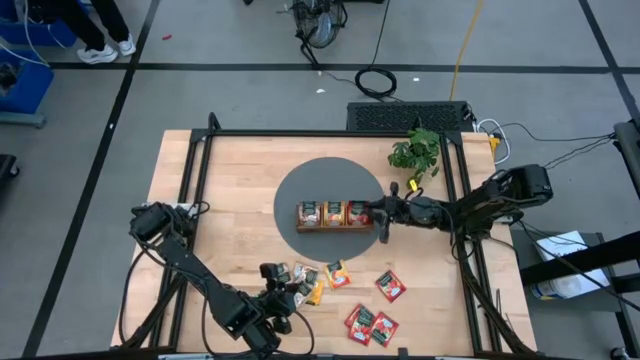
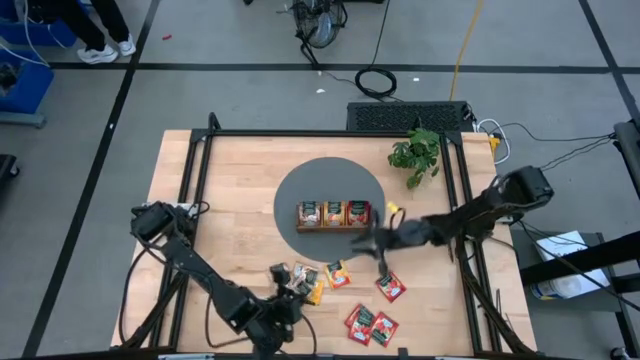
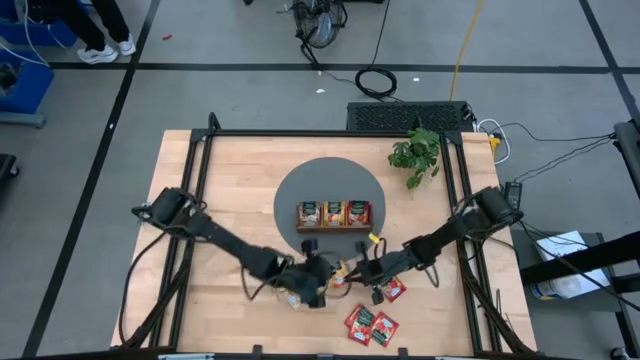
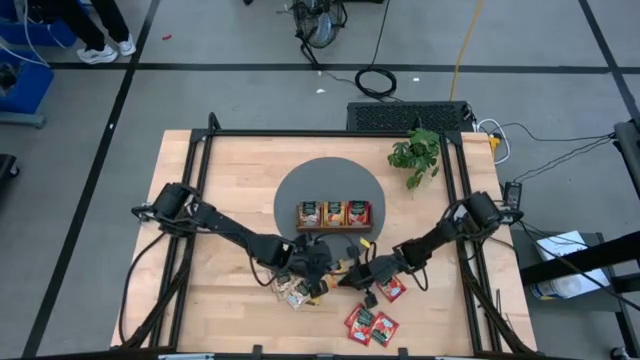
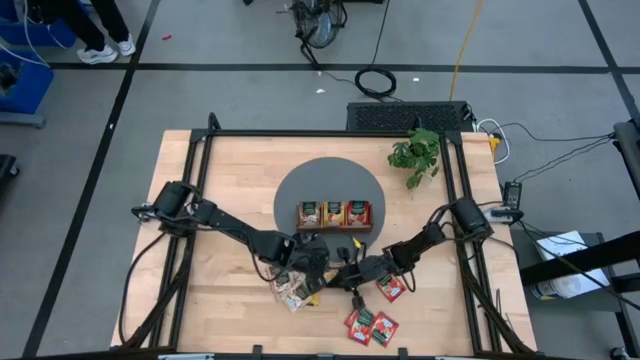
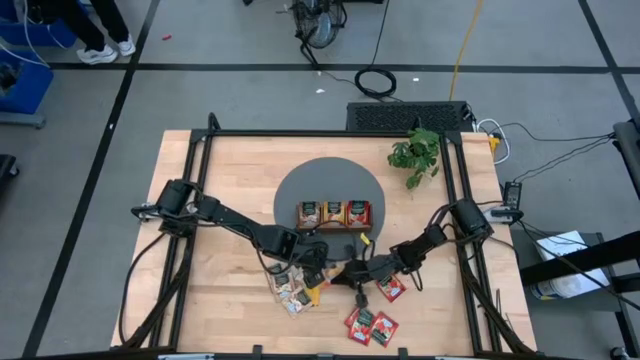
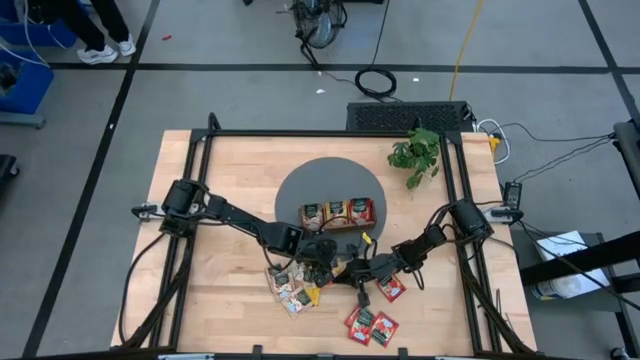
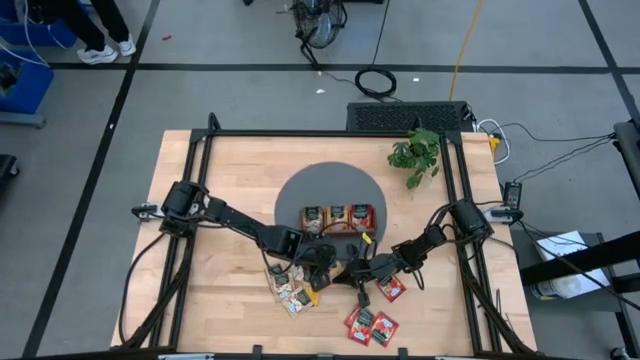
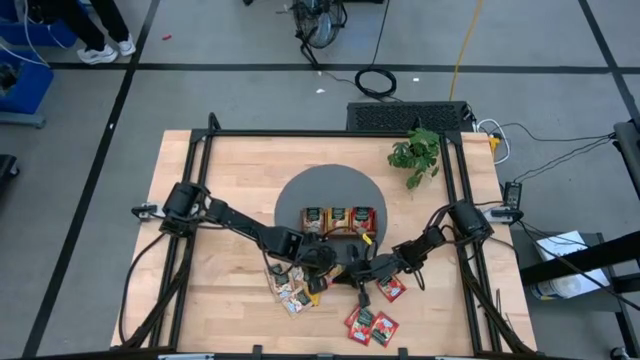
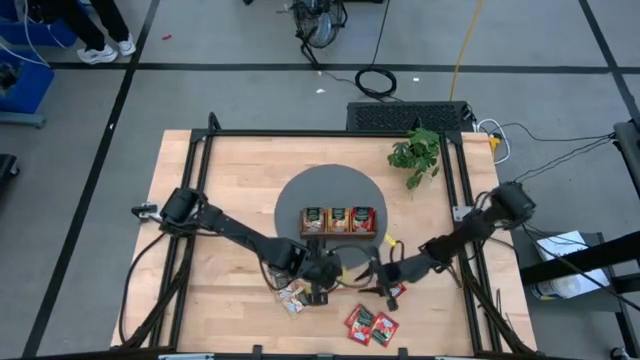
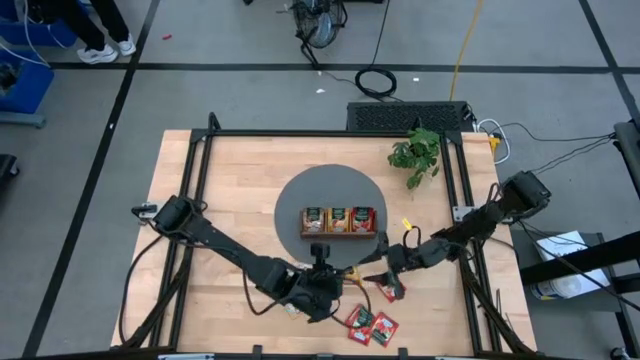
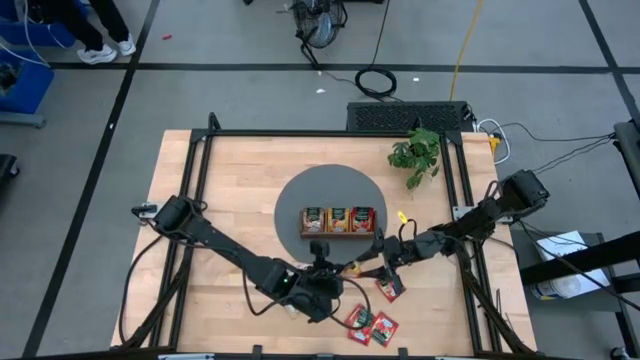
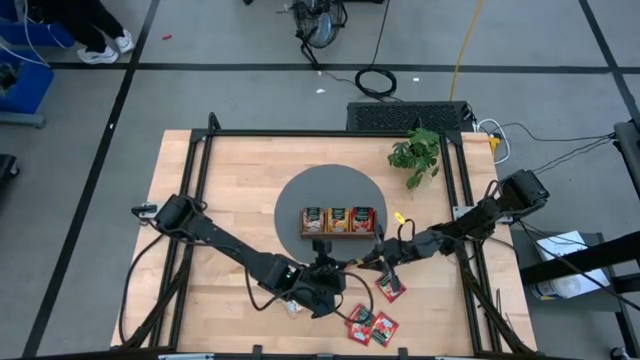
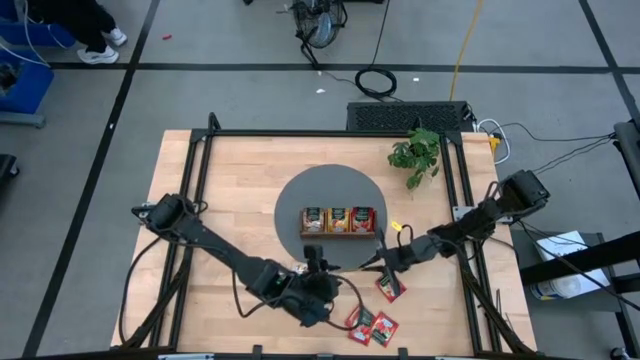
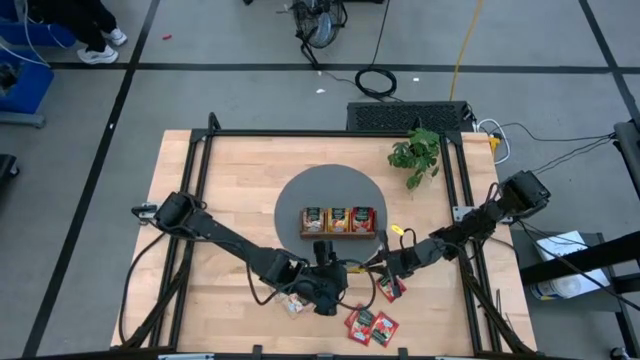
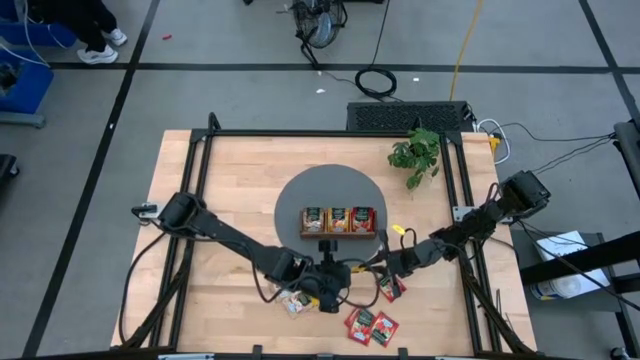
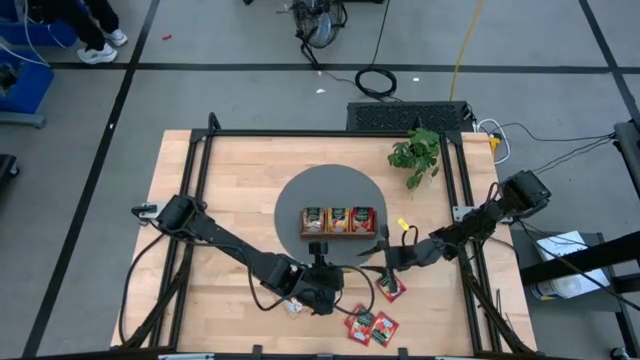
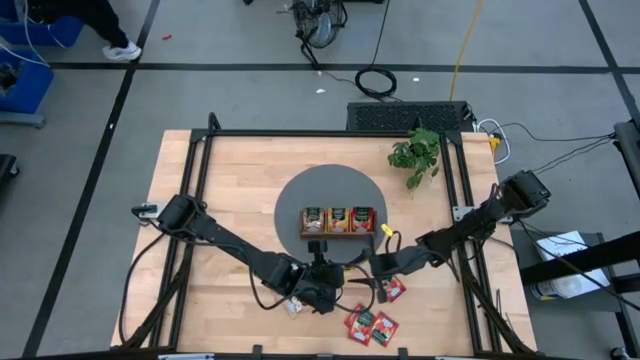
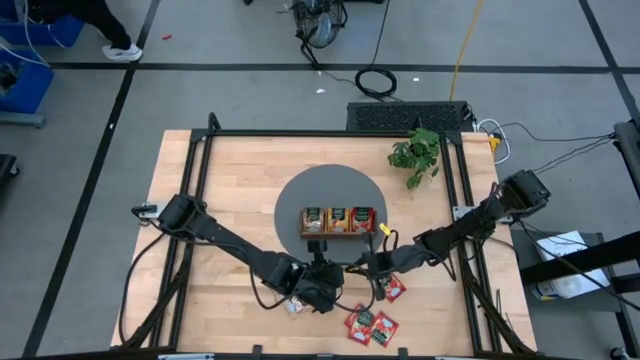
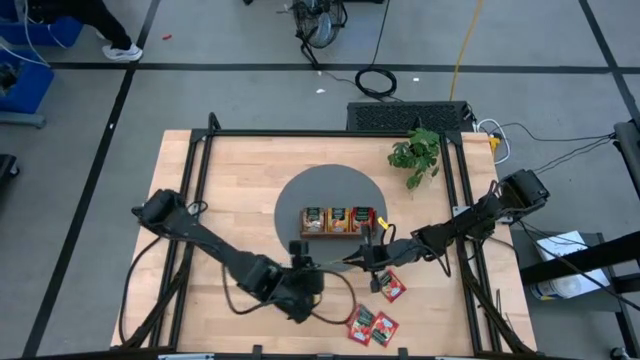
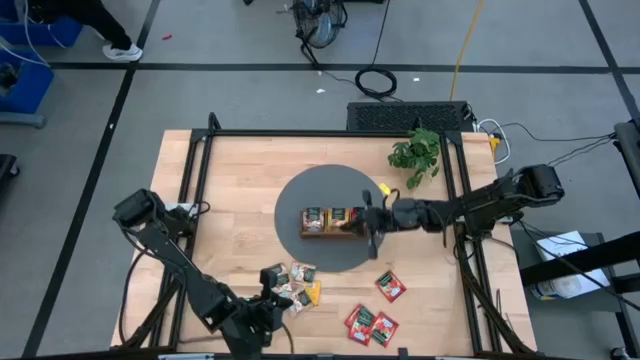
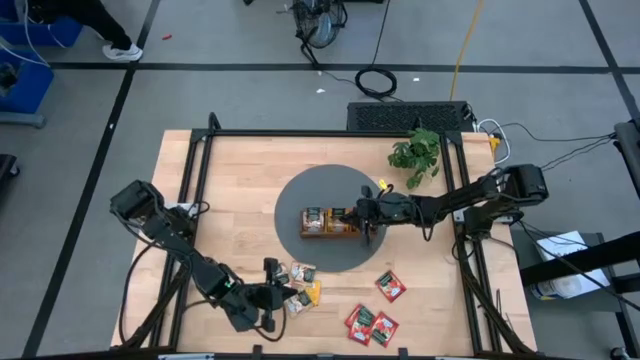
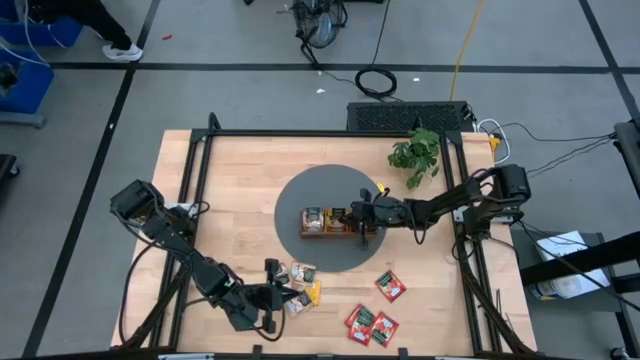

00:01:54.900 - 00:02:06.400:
Task: Pick & Place Tea
Put the top orange tea bag into the middle slot of the wooden organizer

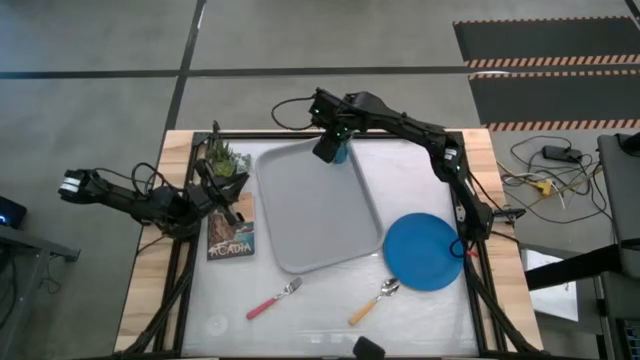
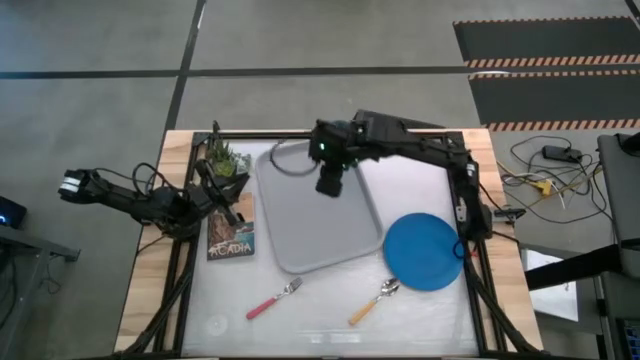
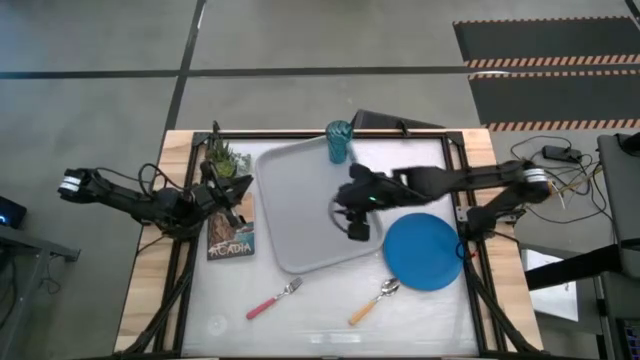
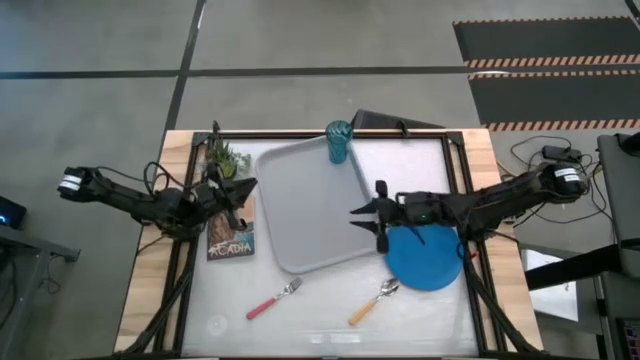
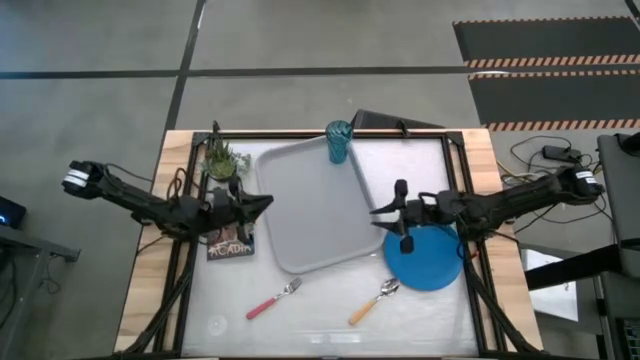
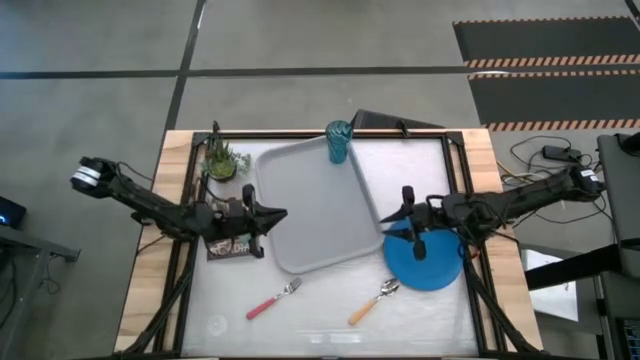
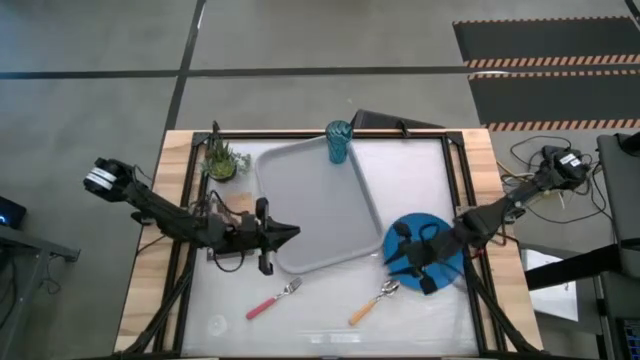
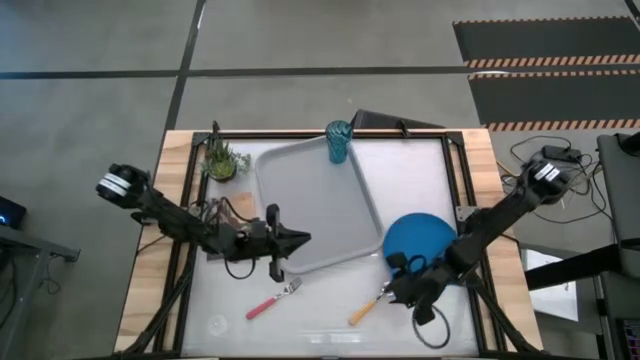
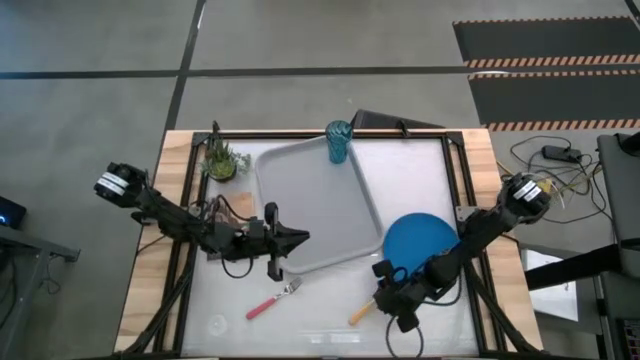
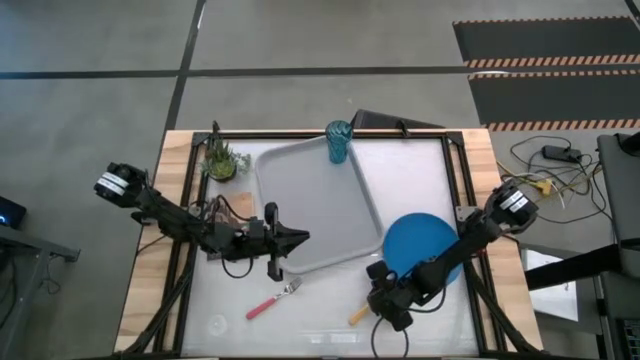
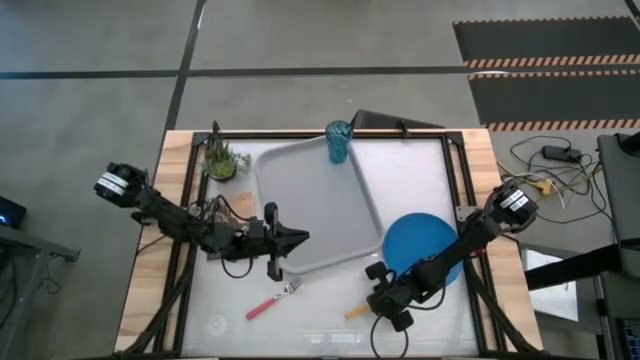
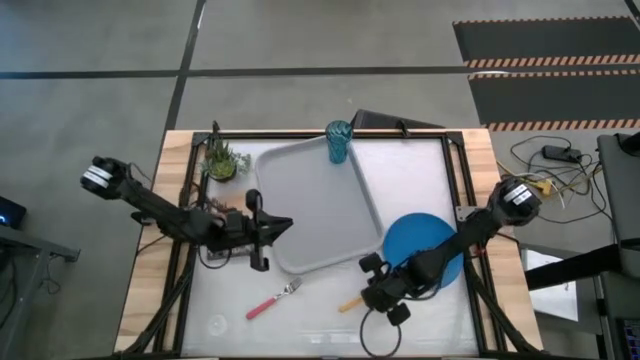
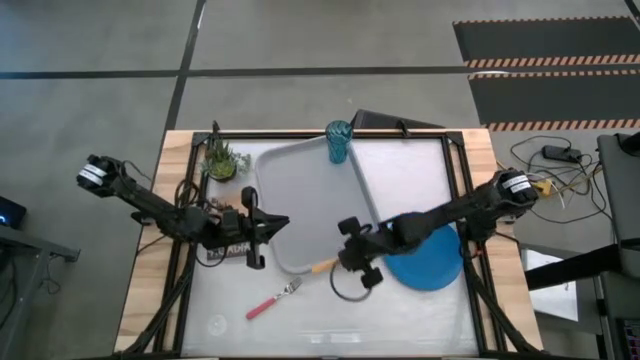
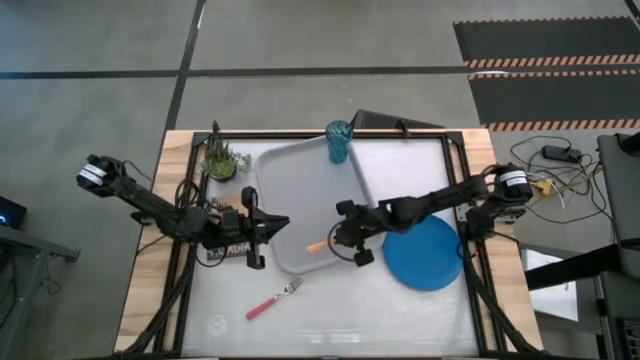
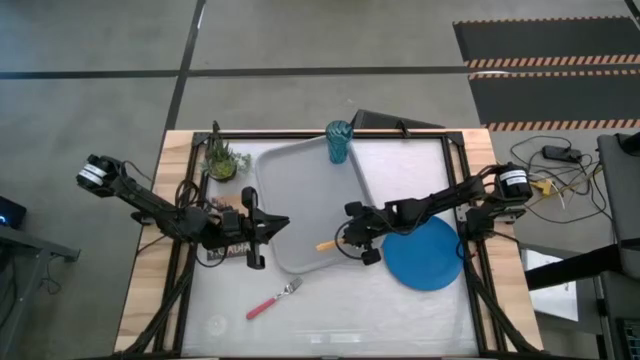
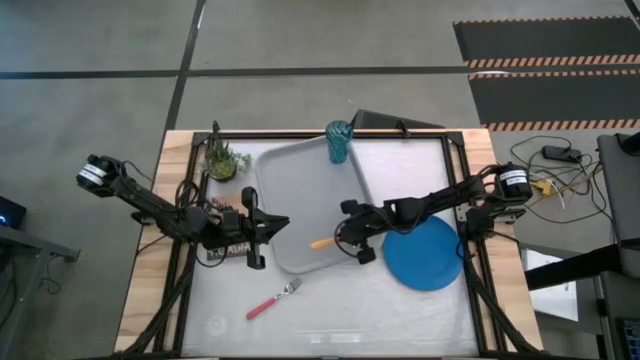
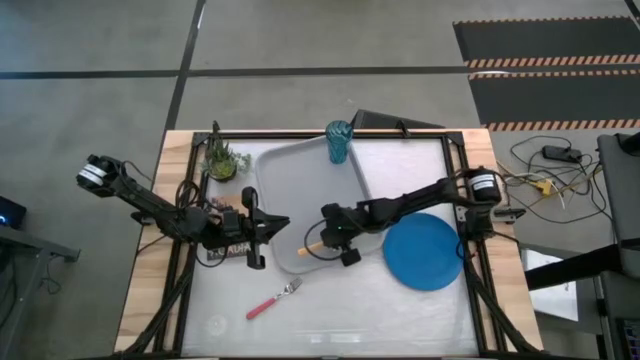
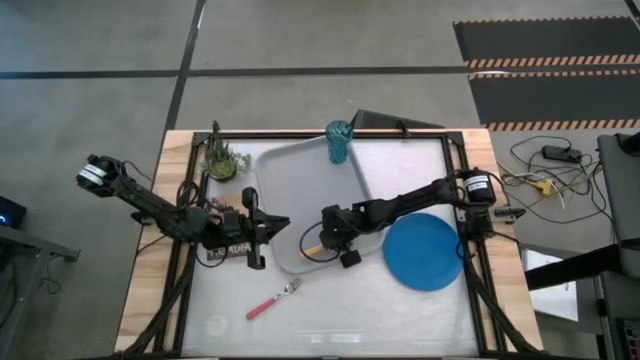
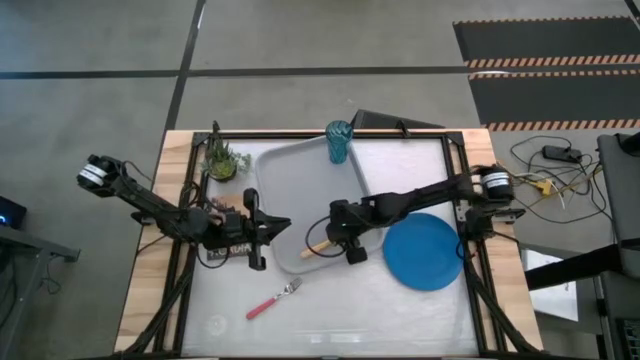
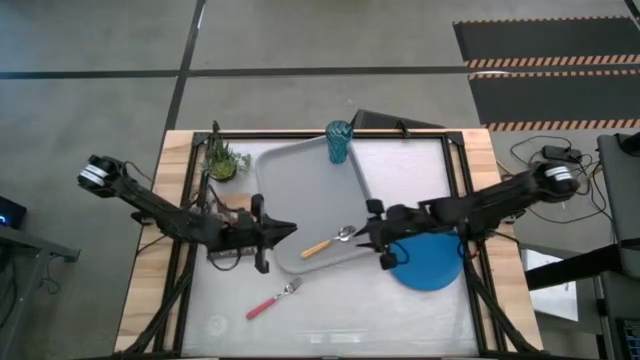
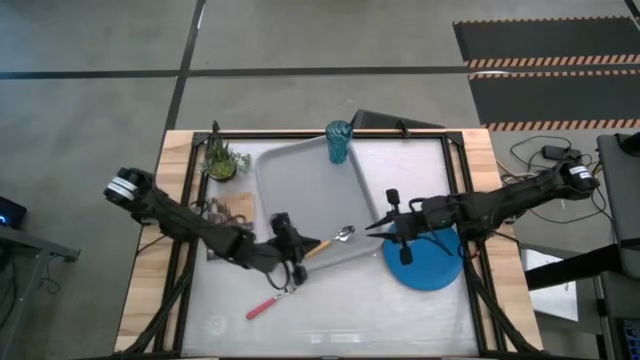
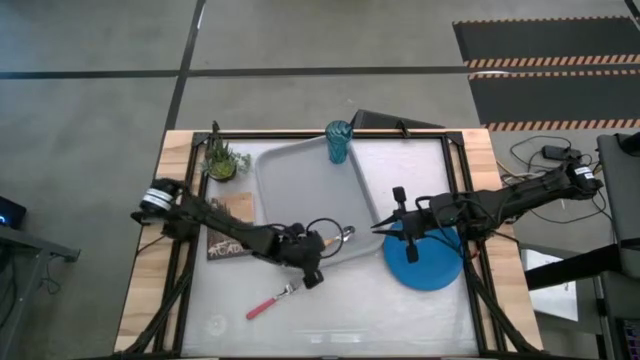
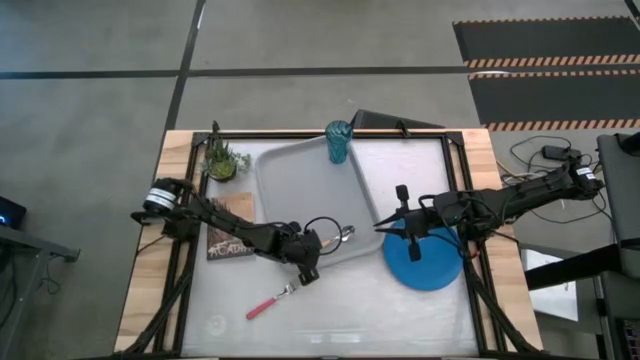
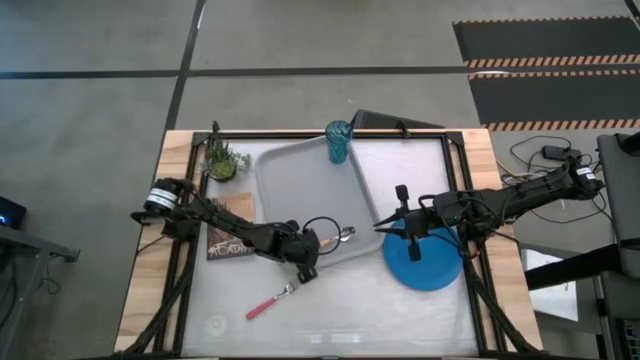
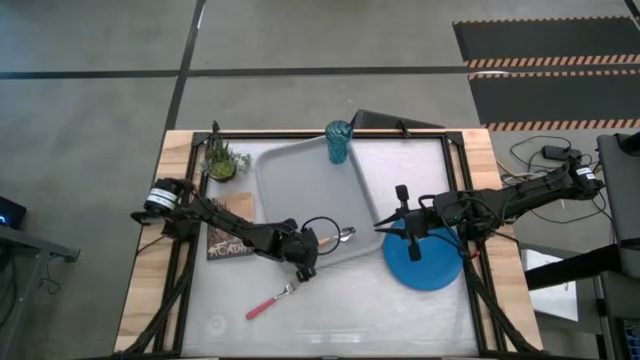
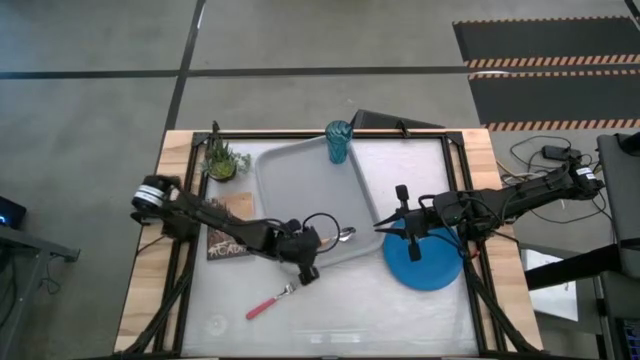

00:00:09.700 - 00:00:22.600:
Task: Pick and place plate/cup/fork/spoon on tray
Put the yellow spoon on the right side of the gray serving tray
